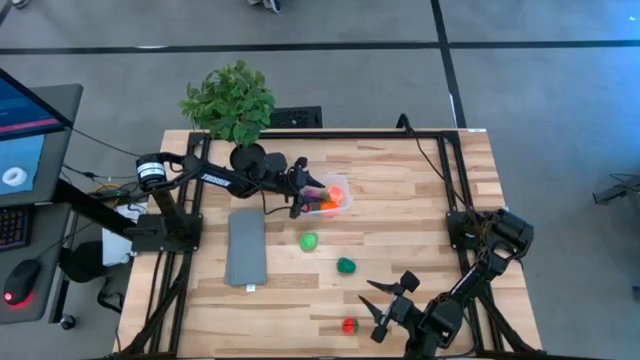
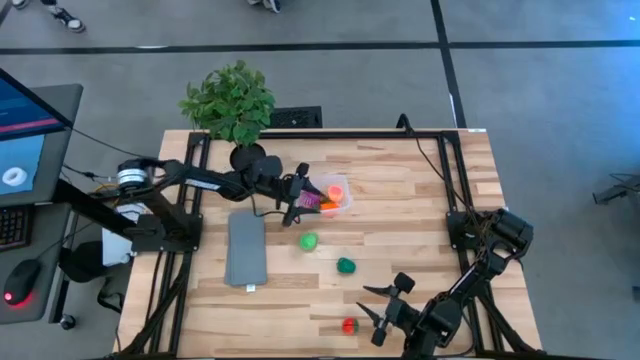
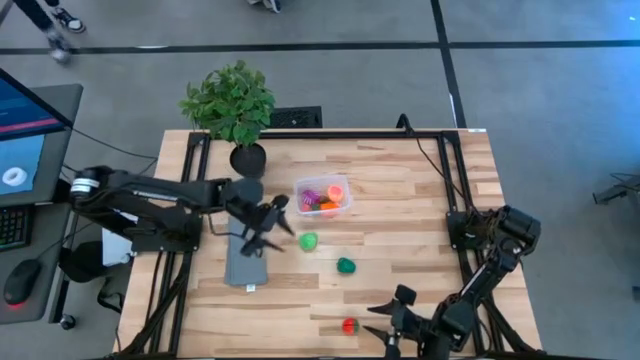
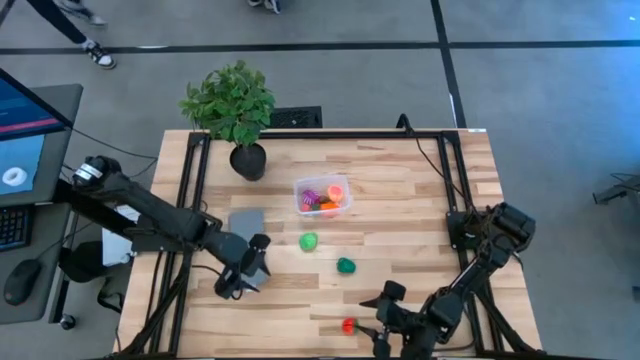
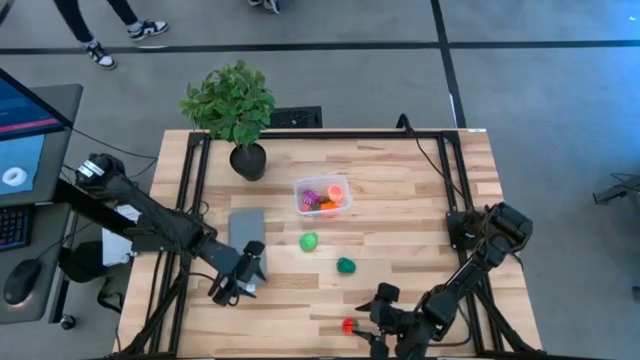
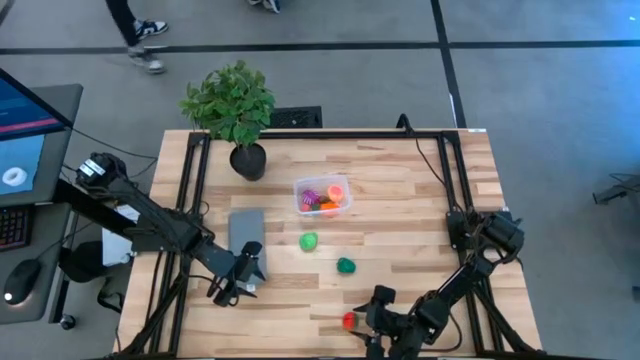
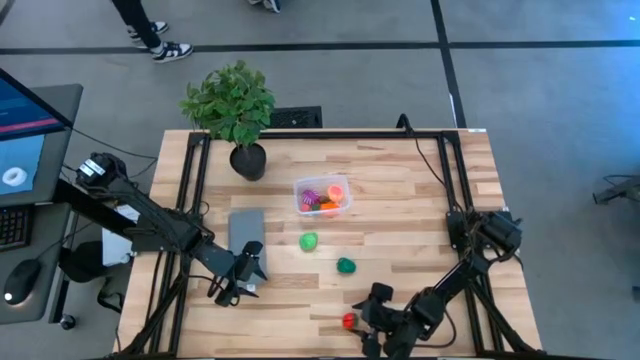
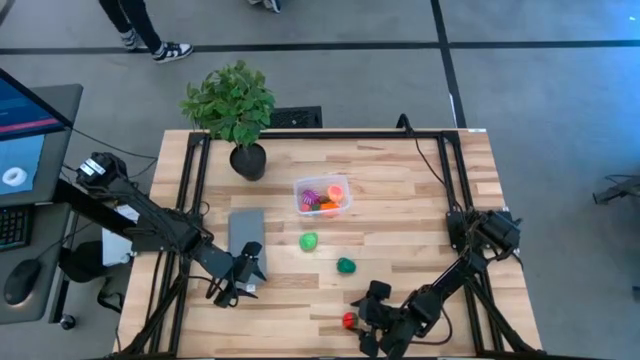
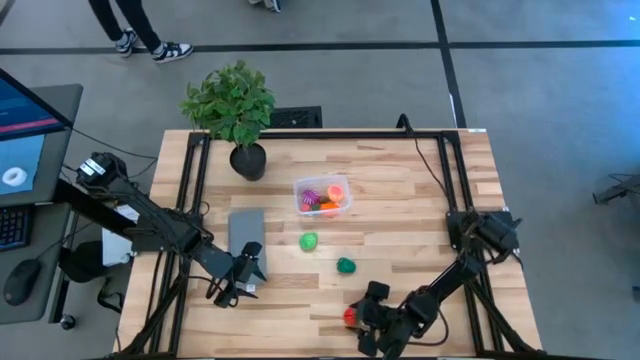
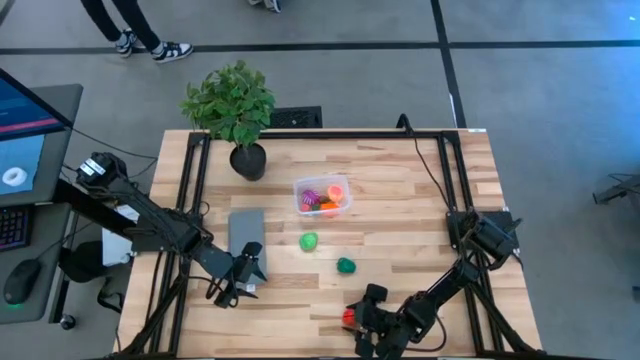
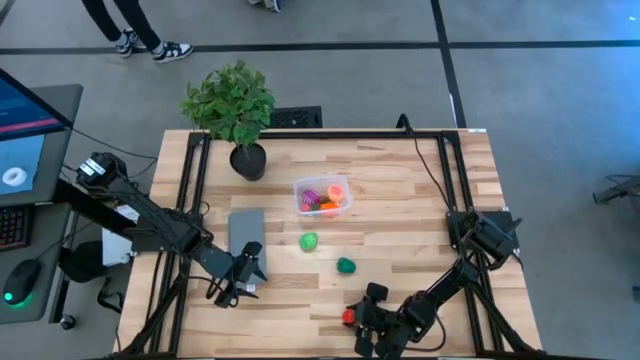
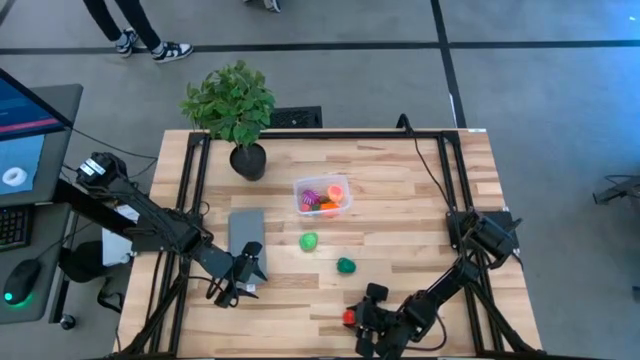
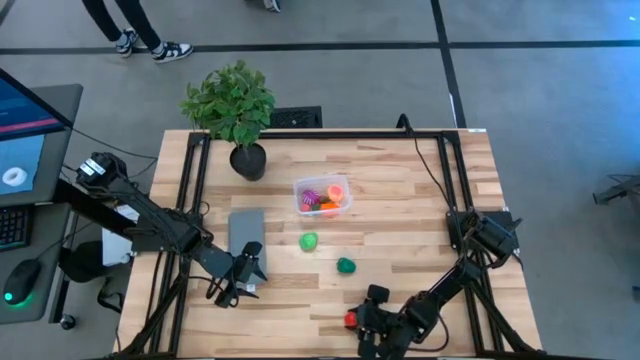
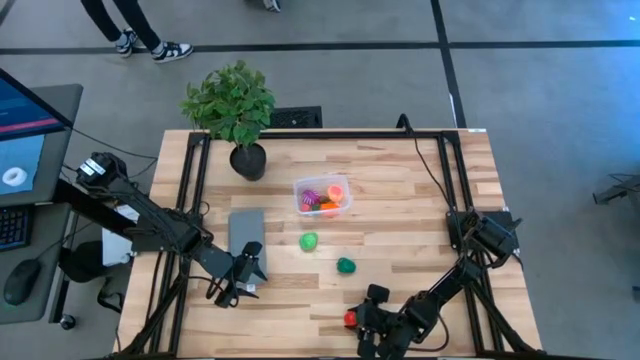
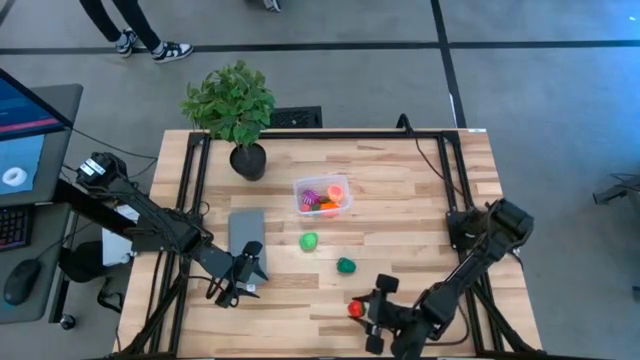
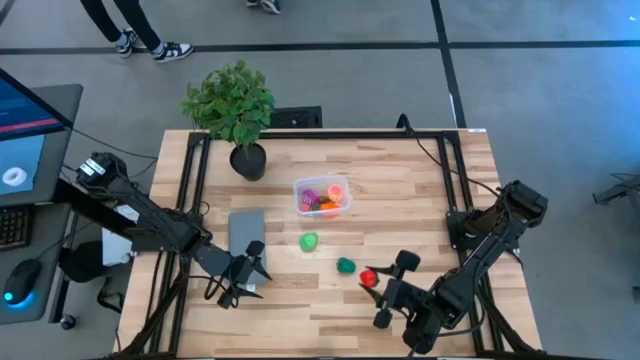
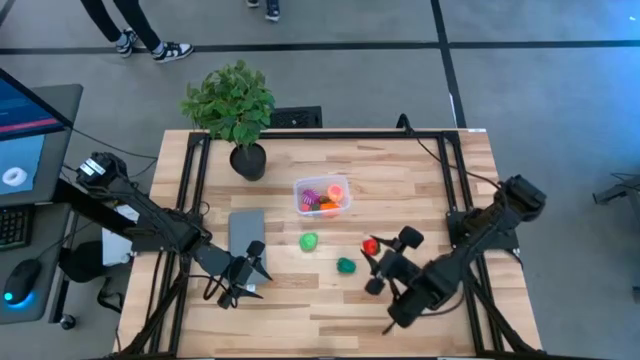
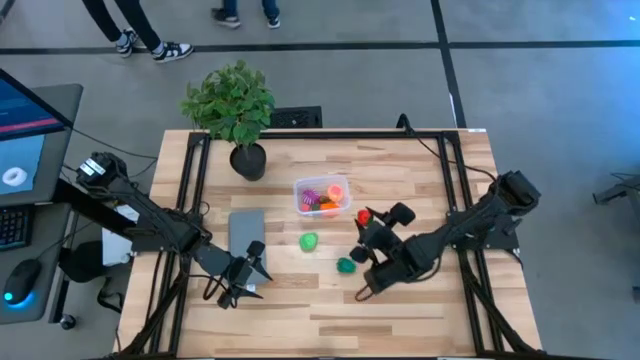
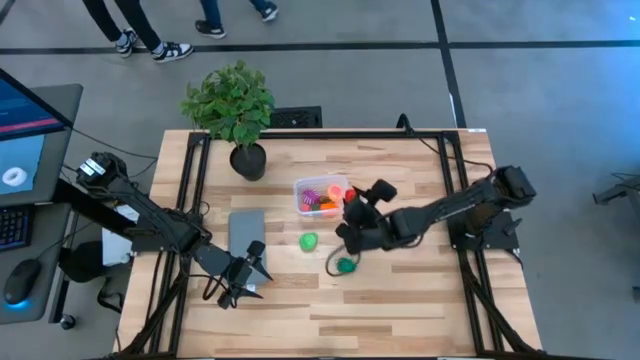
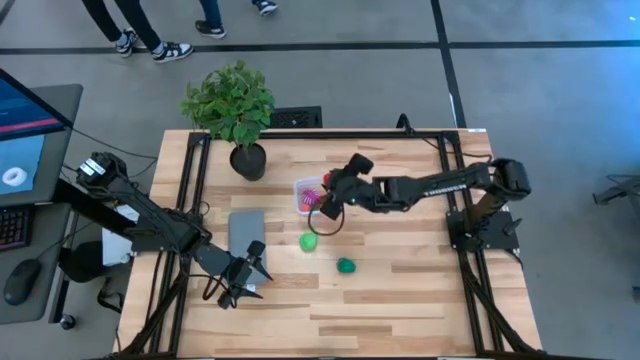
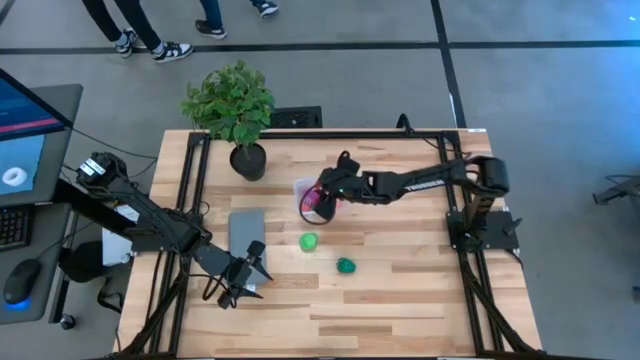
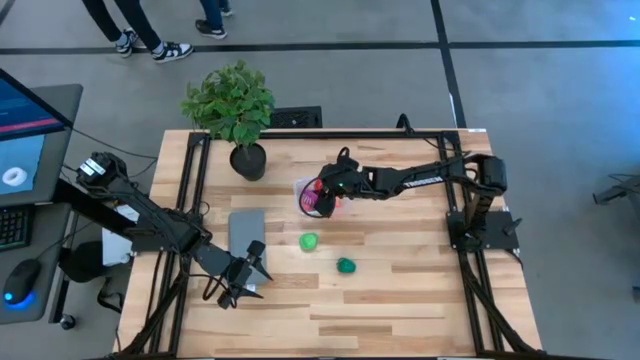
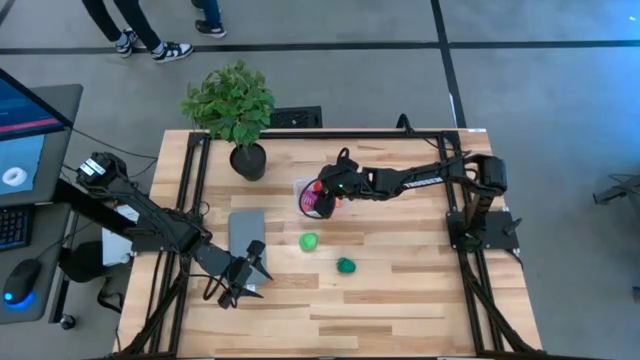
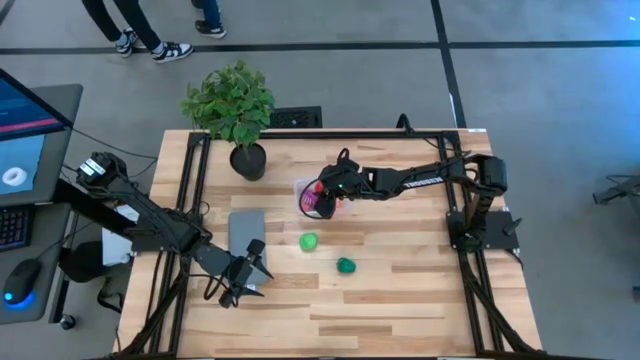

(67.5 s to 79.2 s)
Task: Pick and placing Produce into tupperware
Put the big strawberry into the transparent container

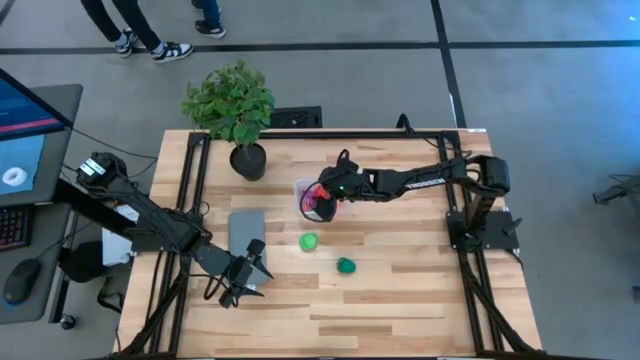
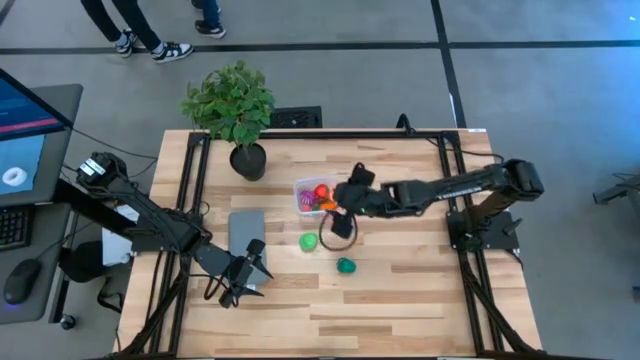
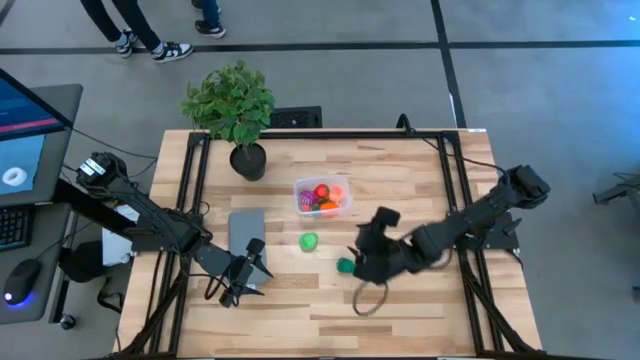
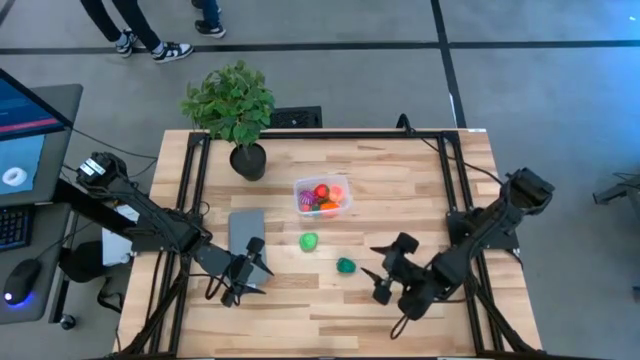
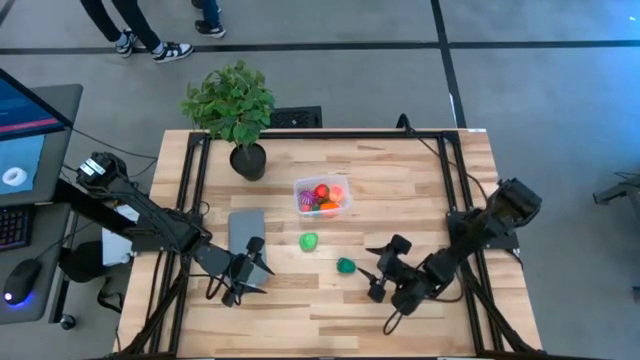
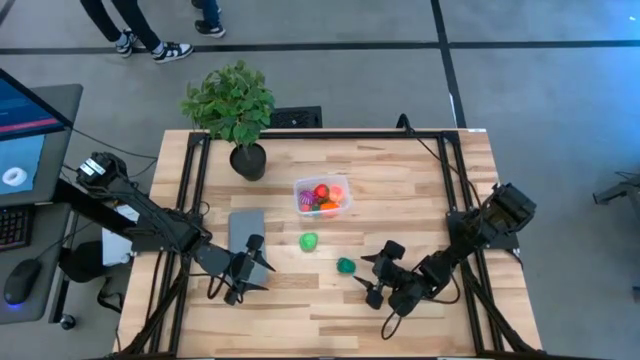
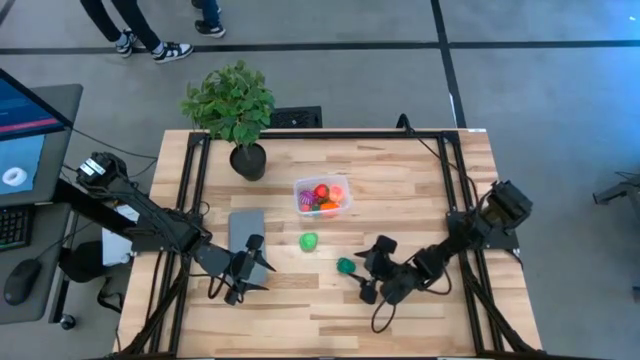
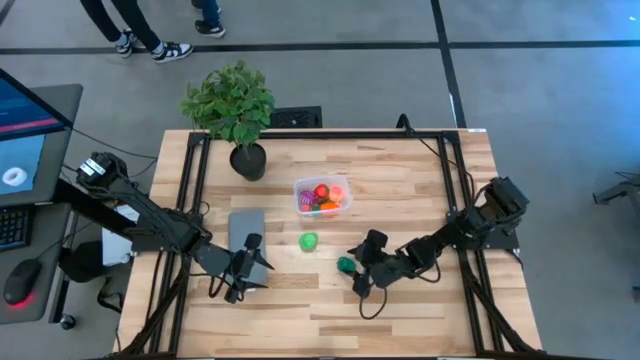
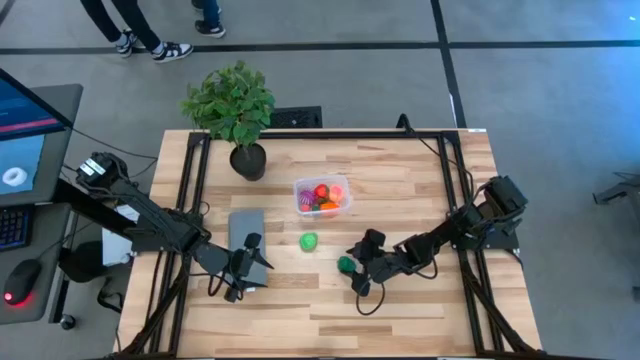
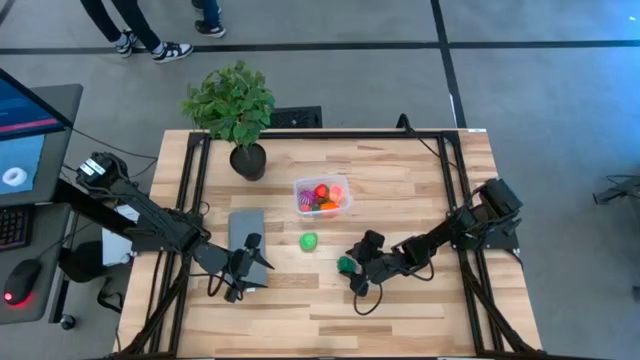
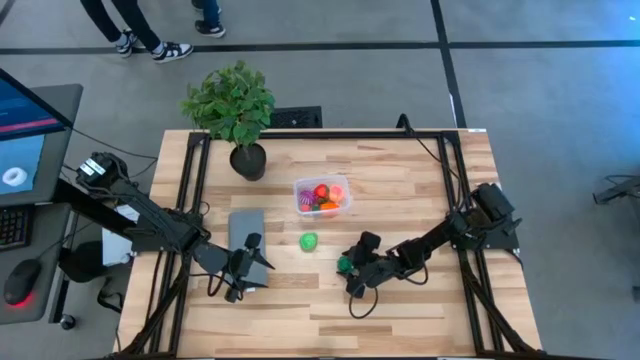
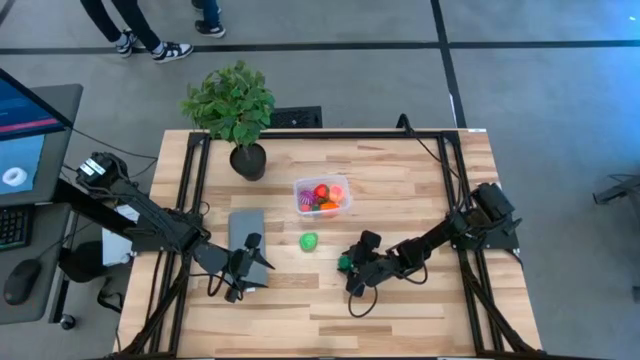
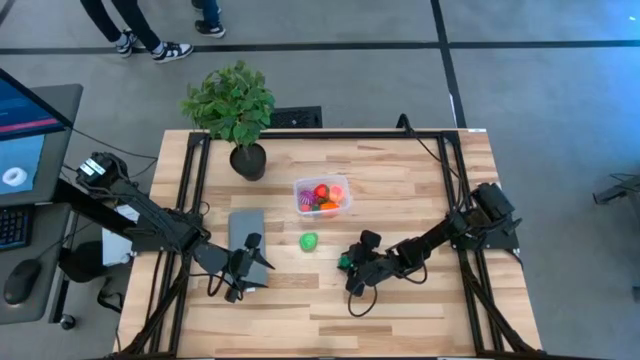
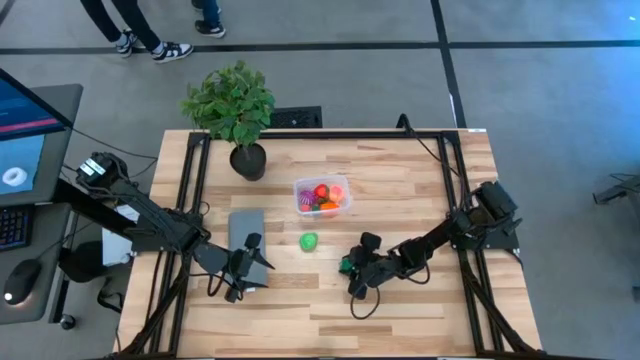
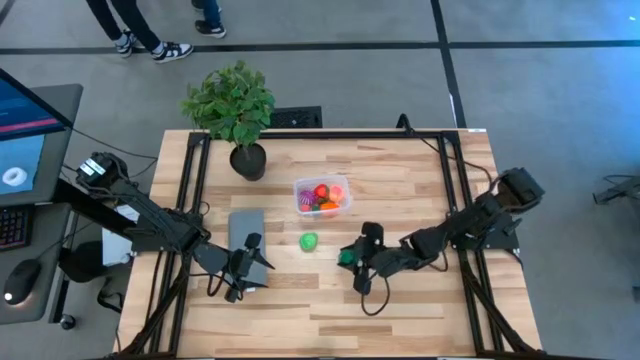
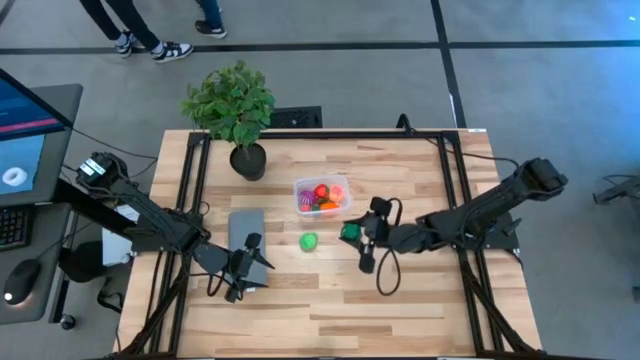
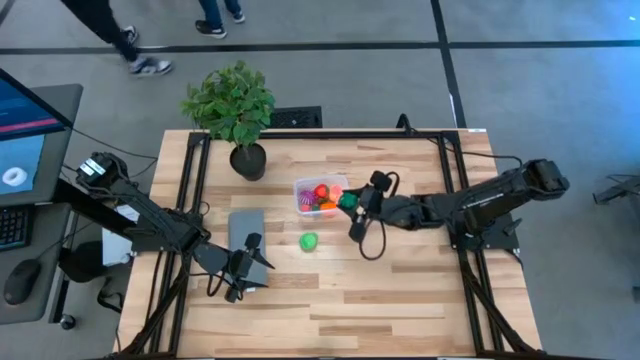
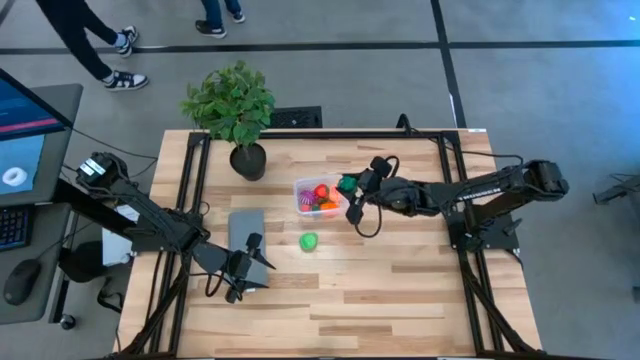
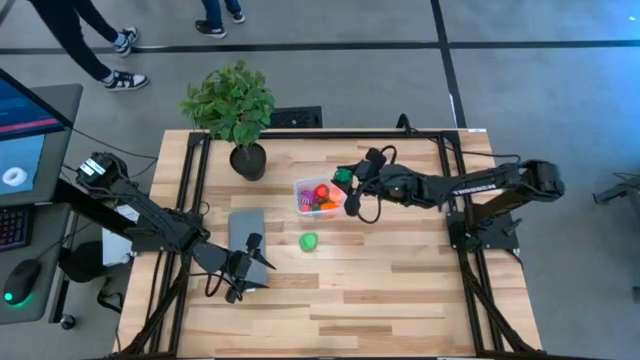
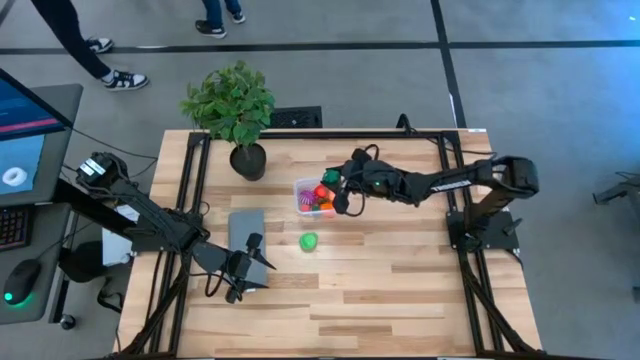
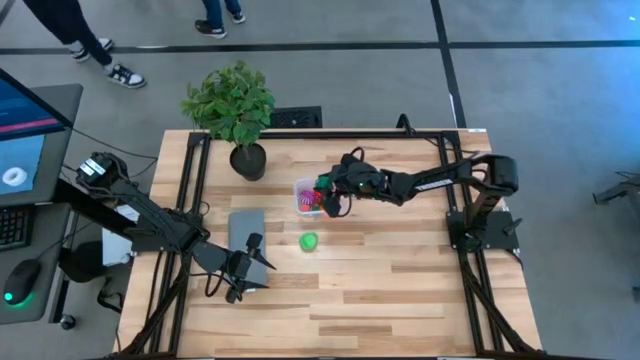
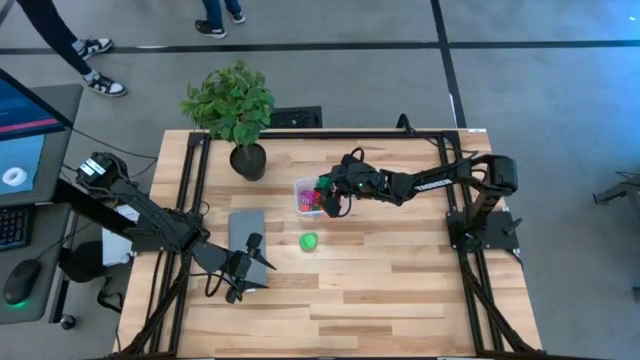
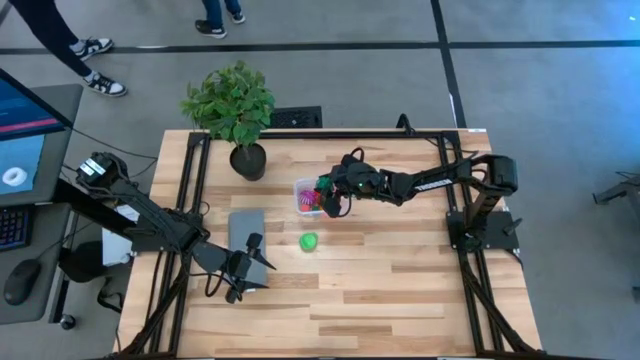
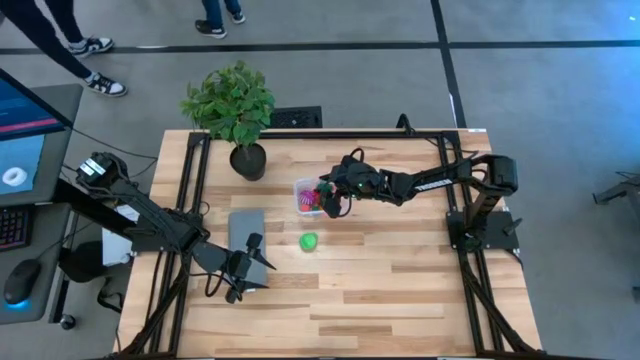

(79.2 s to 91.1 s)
Put the bell pepper into the transparent container
